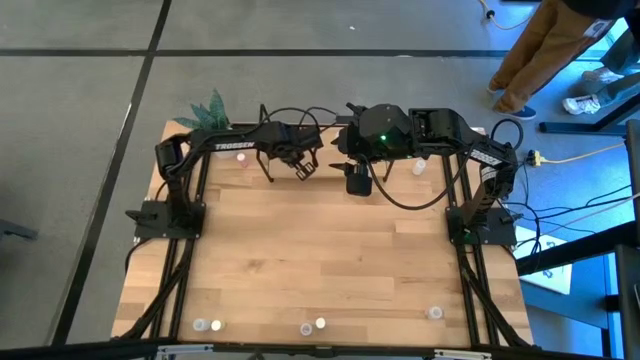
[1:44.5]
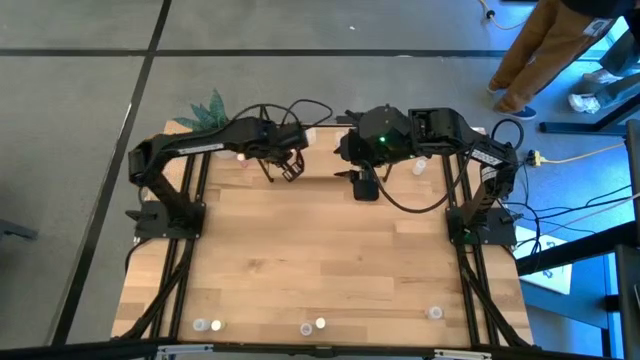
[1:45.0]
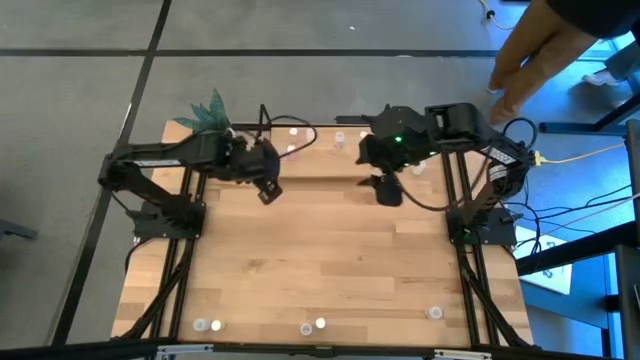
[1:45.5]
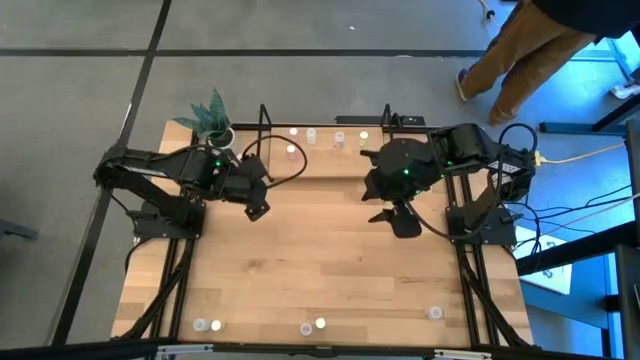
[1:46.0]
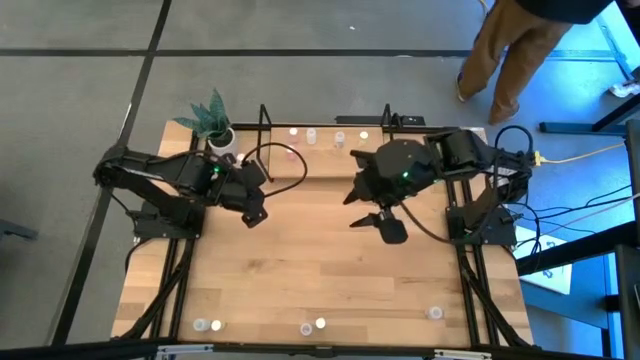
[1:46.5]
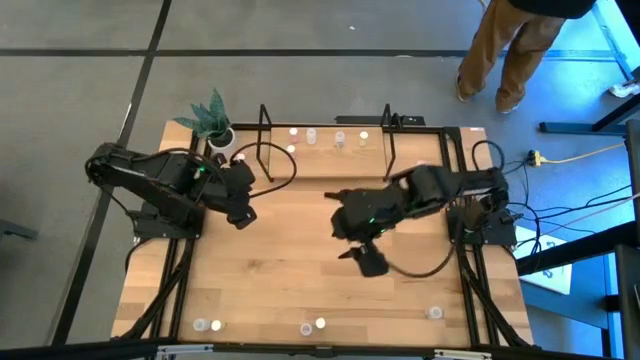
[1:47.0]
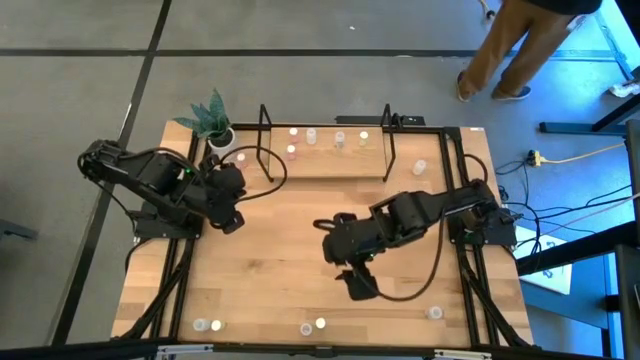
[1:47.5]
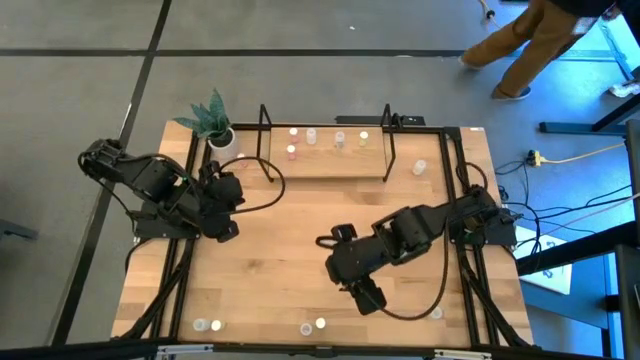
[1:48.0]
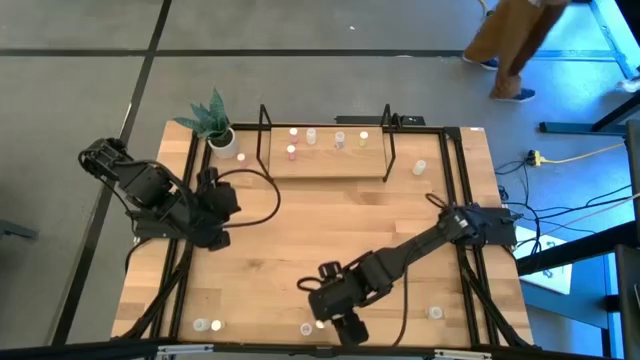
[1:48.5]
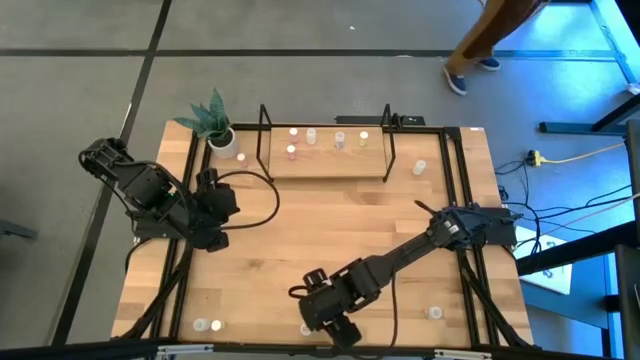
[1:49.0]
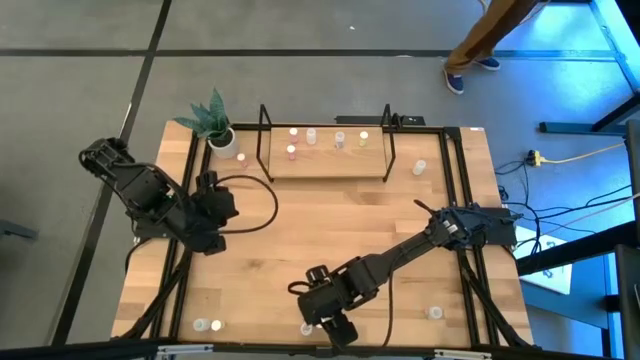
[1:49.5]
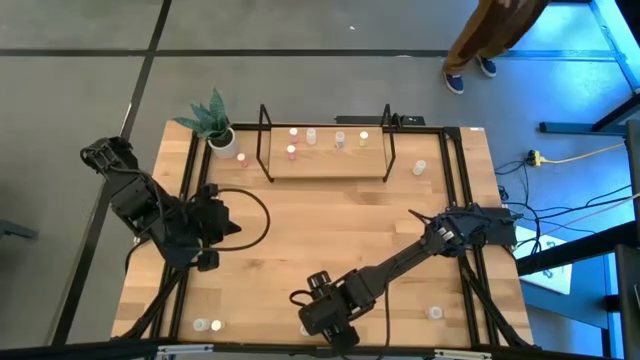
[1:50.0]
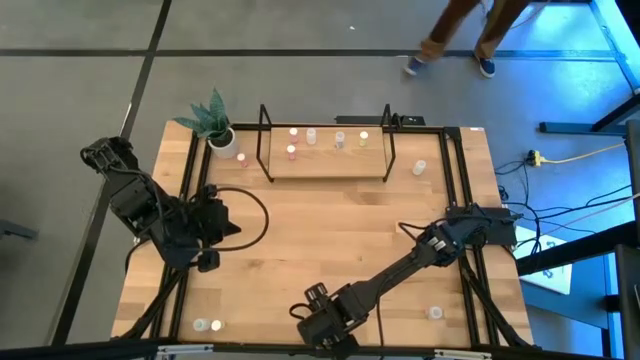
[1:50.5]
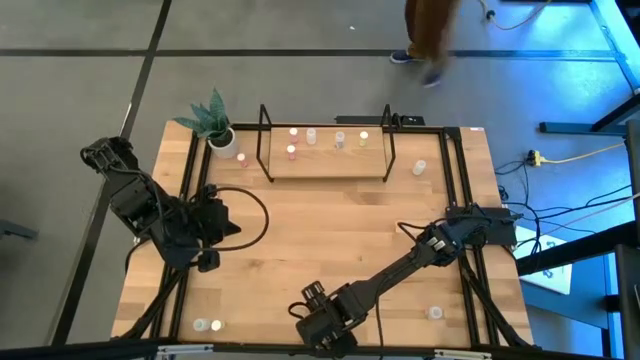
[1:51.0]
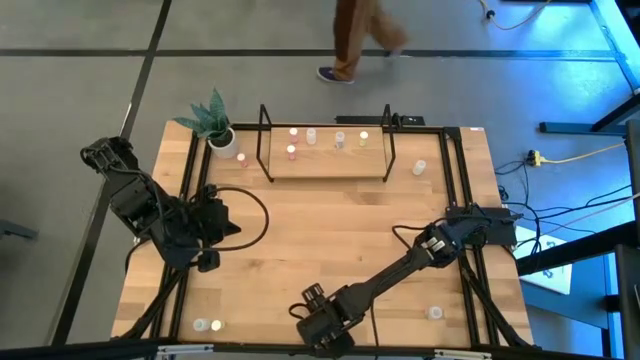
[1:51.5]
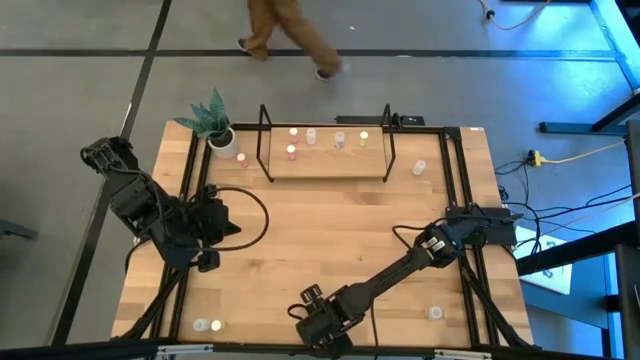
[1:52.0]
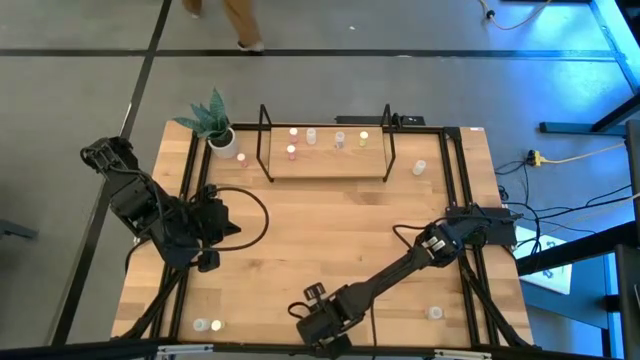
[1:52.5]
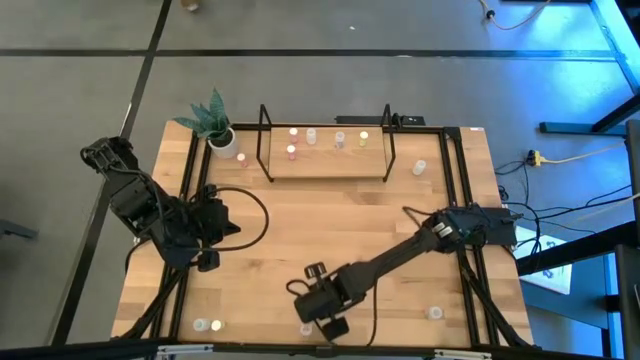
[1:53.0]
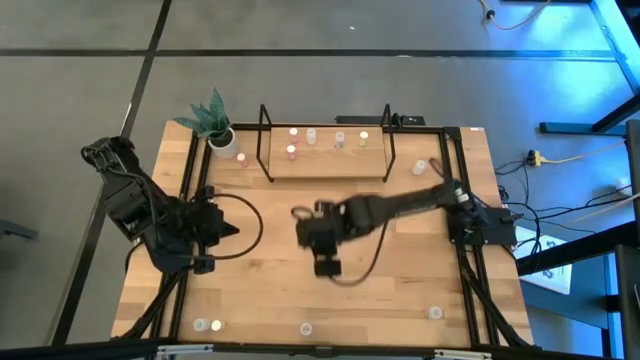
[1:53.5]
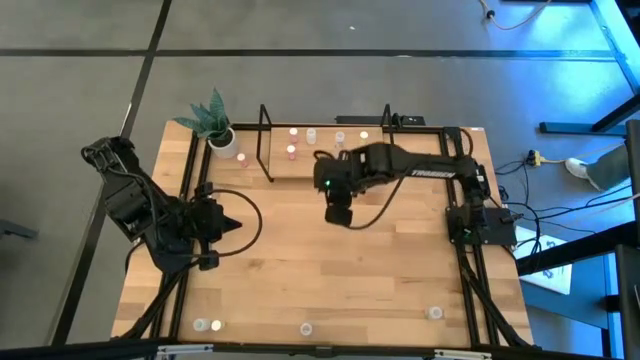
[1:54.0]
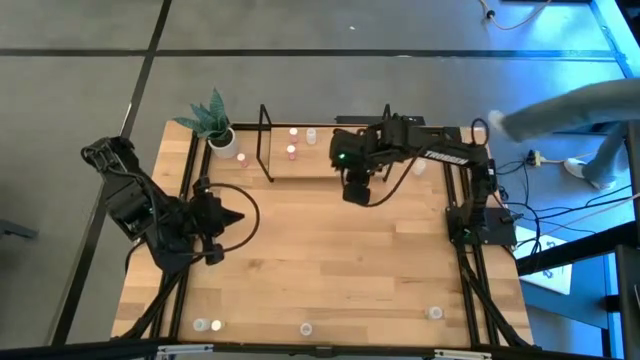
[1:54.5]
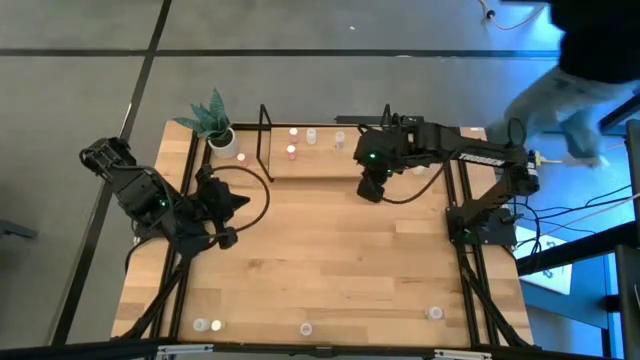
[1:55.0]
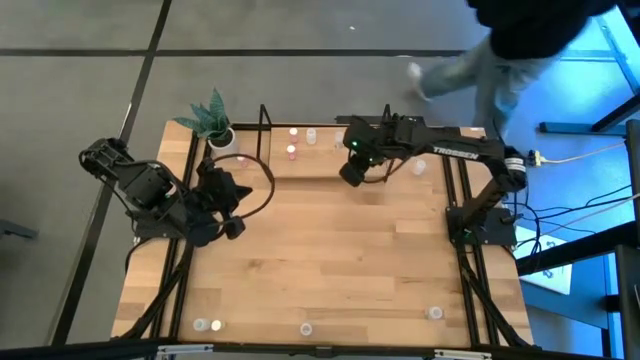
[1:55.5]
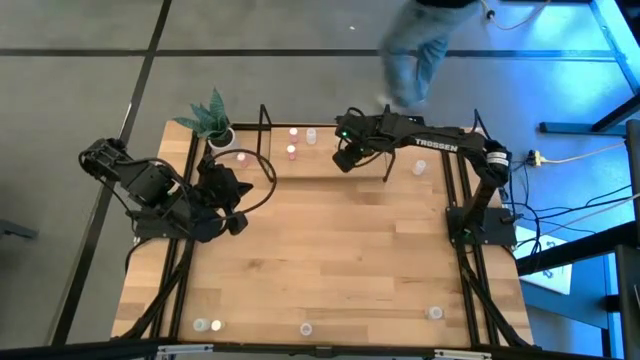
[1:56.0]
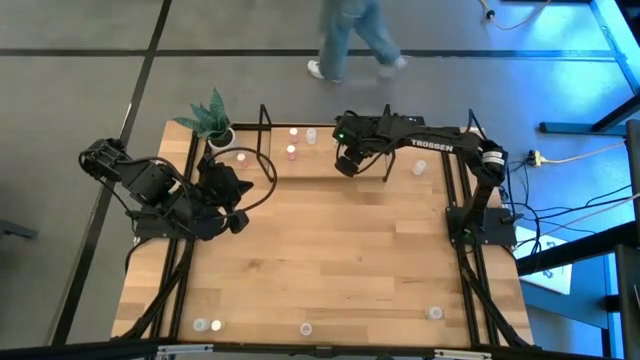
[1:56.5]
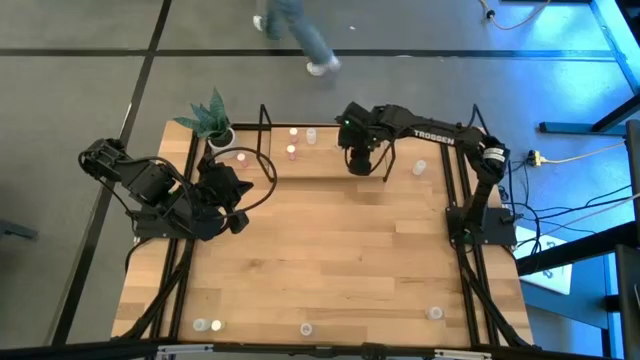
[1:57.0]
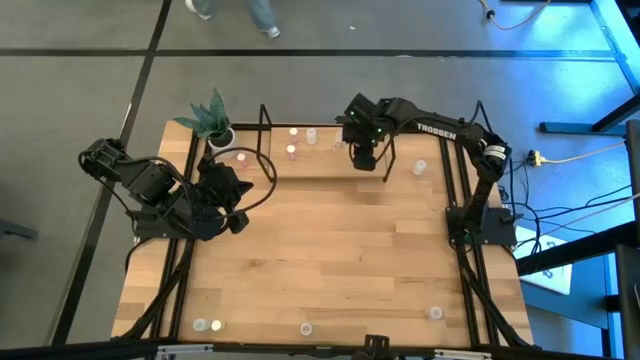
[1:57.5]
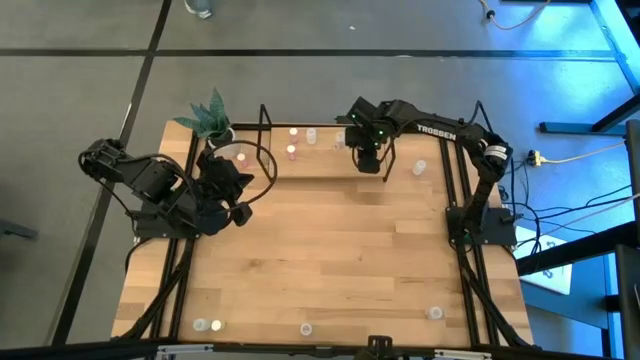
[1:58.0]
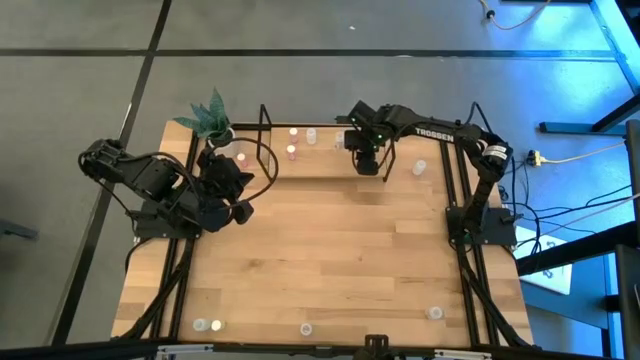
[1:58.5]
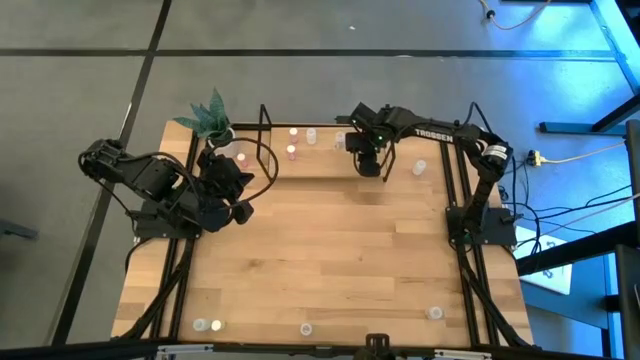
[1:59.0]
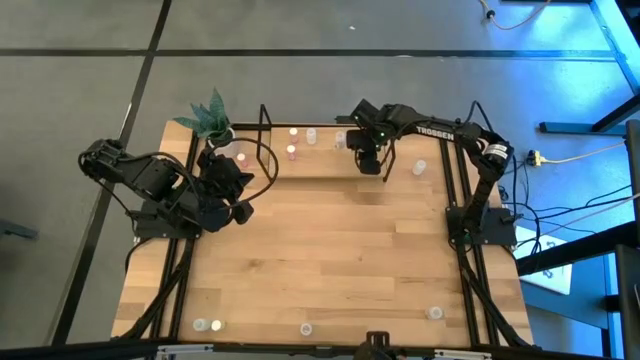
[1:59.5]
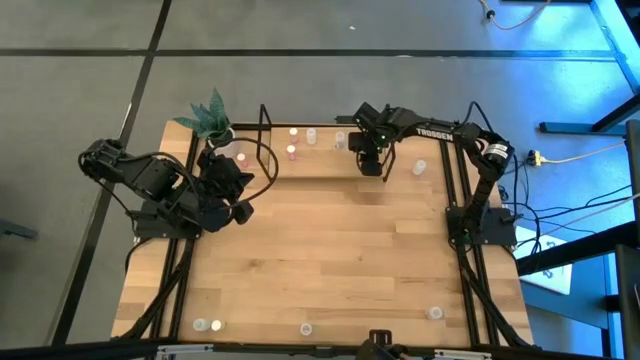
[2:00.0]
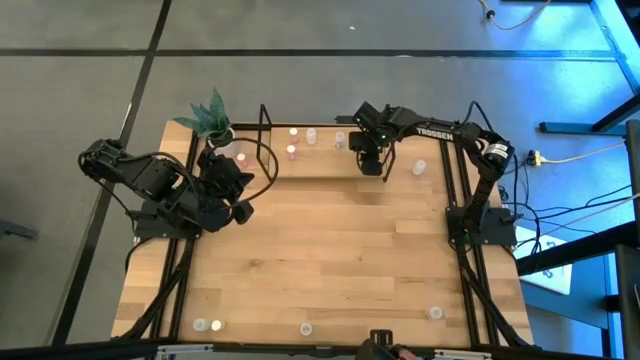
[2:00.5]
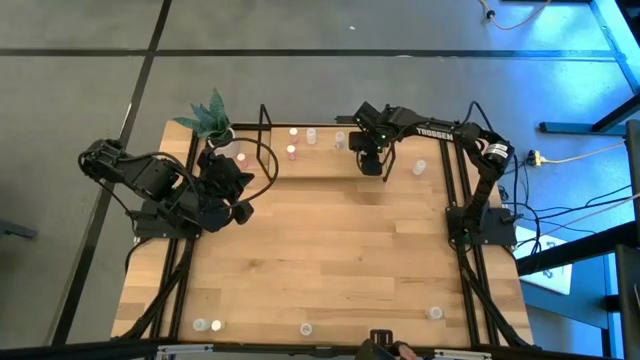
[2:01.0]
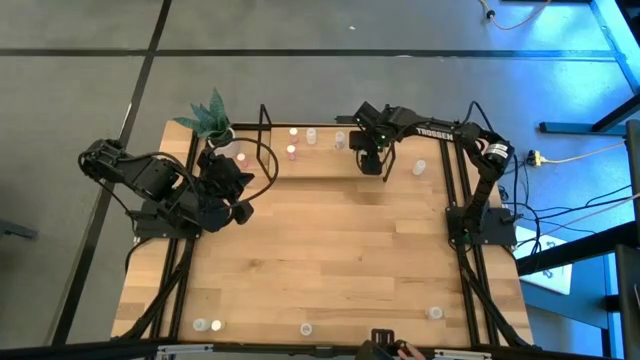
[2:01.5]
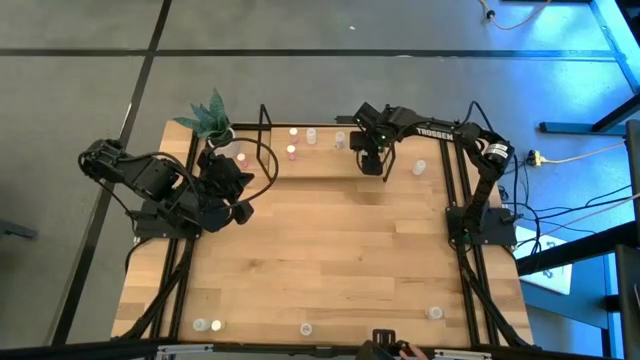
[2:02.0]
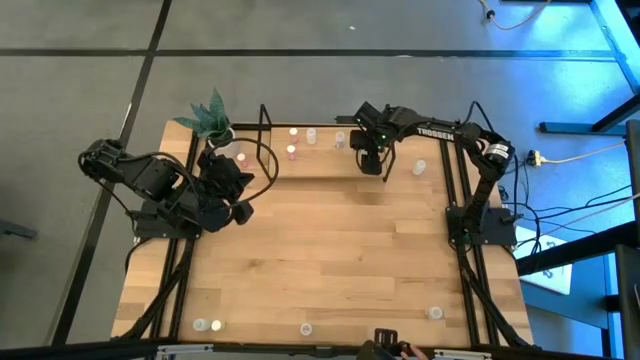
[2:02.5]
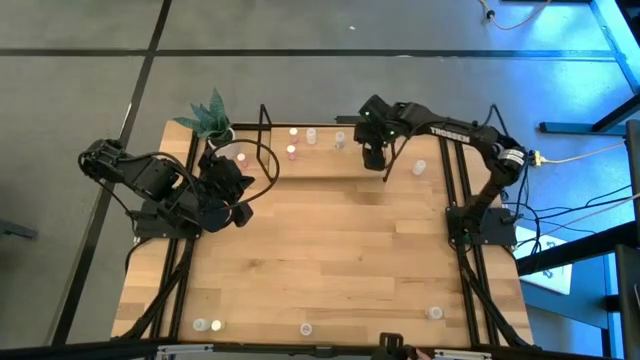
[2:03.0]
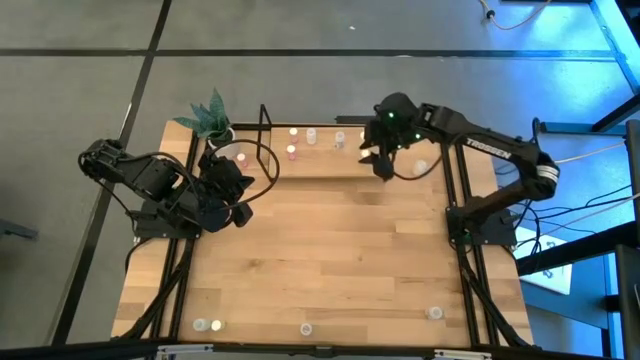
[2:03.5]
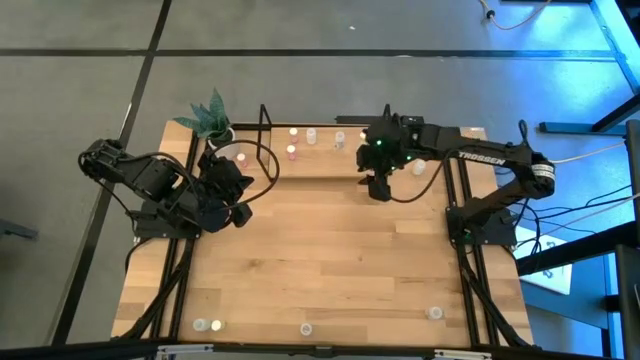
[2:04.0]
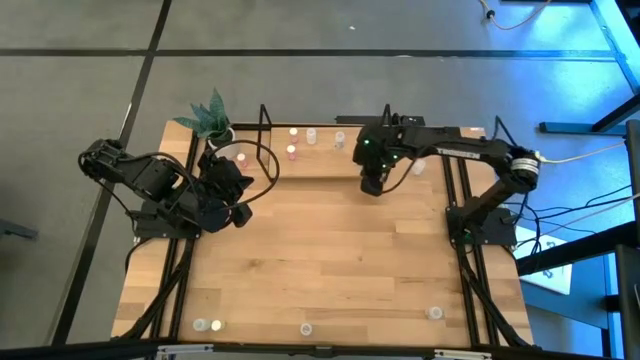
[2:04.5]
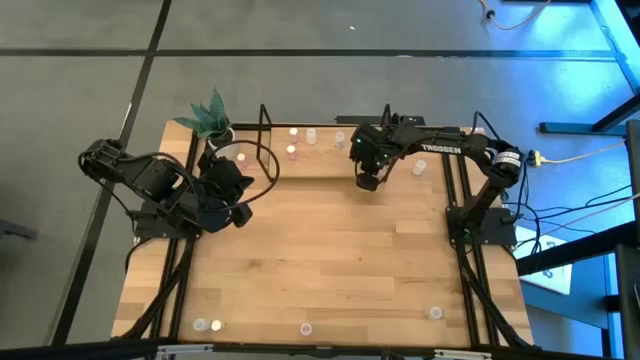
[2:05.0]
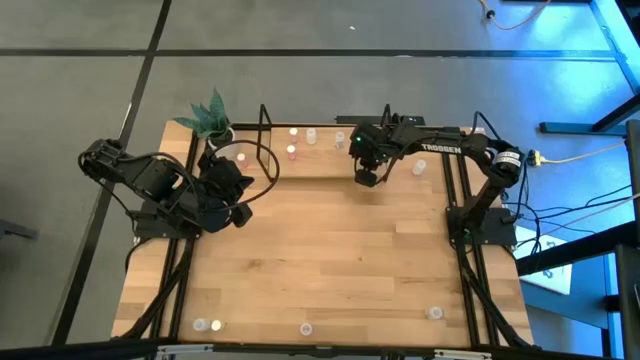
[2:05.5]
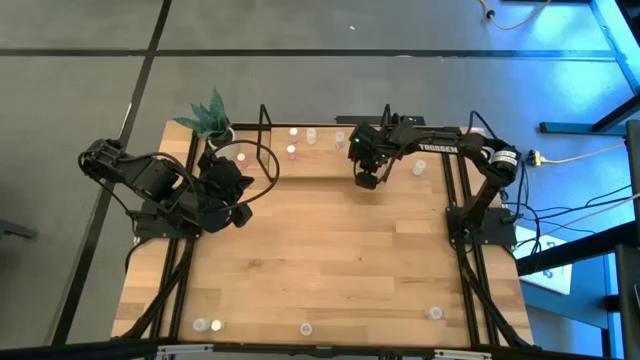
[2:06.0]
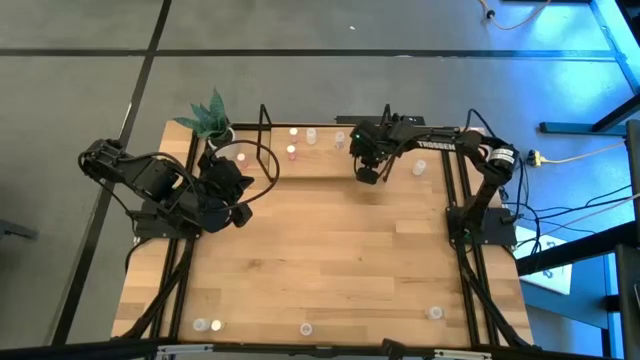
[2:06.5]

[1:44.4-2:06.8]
Task: Pick and place medicine bottles onto shelf by color
Put the right yellow pill bottle on the shelf aligned with the other yellow pill bottle
